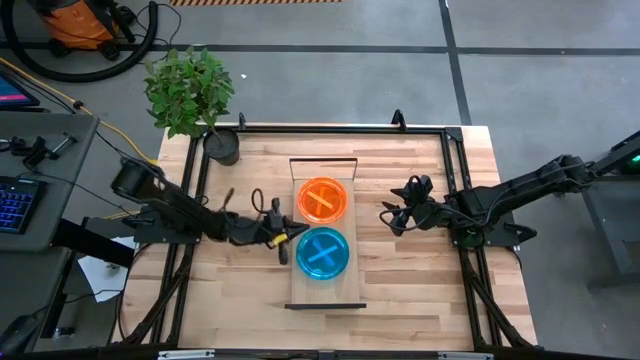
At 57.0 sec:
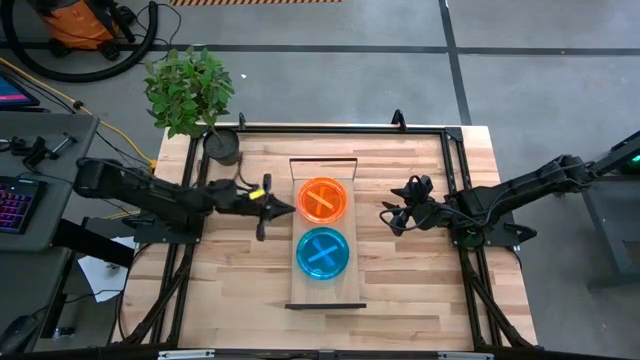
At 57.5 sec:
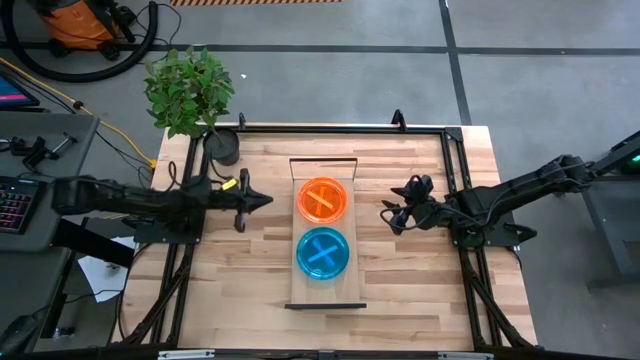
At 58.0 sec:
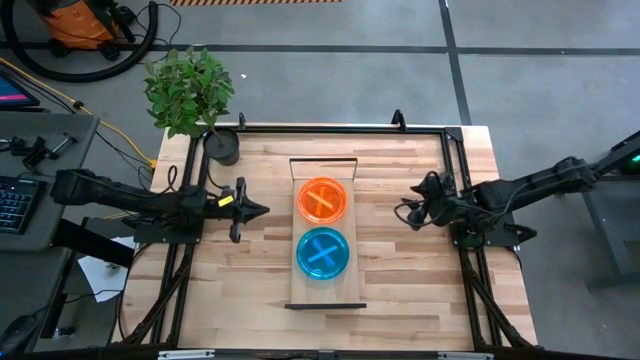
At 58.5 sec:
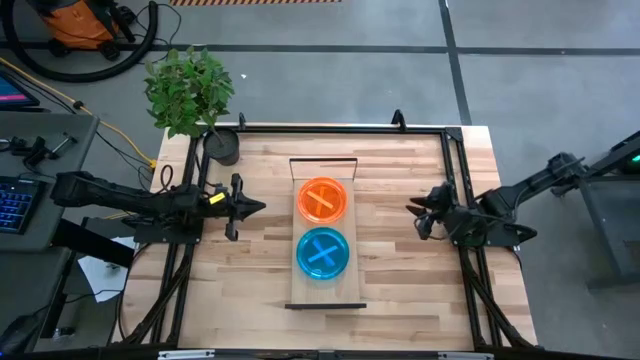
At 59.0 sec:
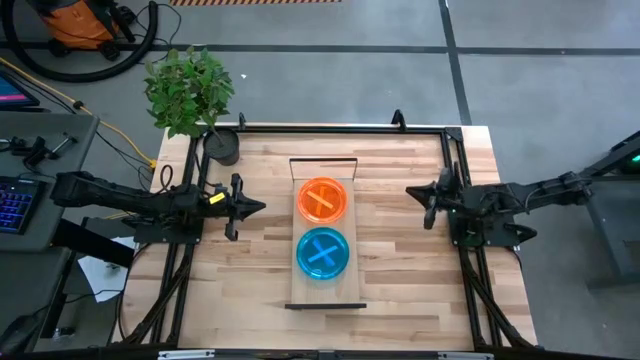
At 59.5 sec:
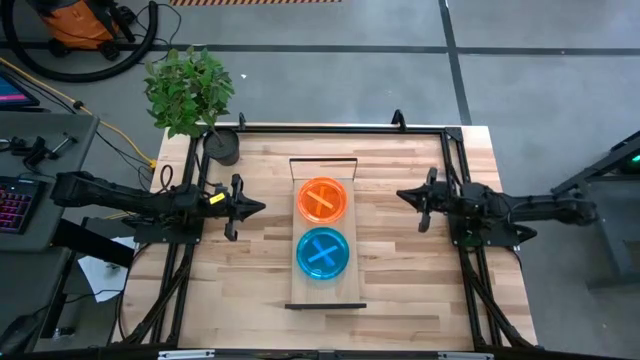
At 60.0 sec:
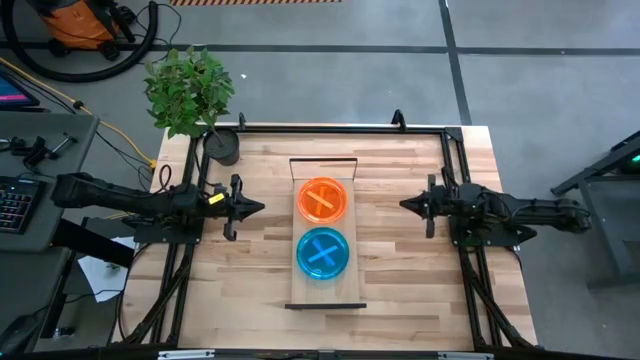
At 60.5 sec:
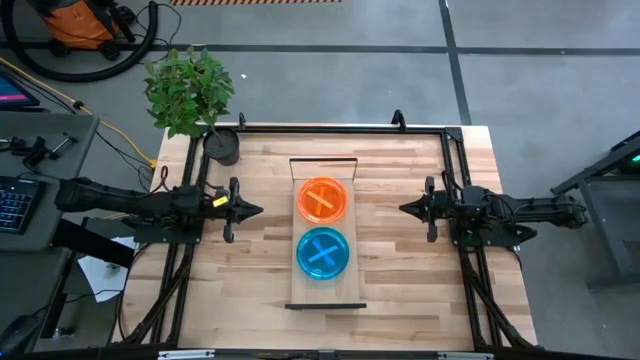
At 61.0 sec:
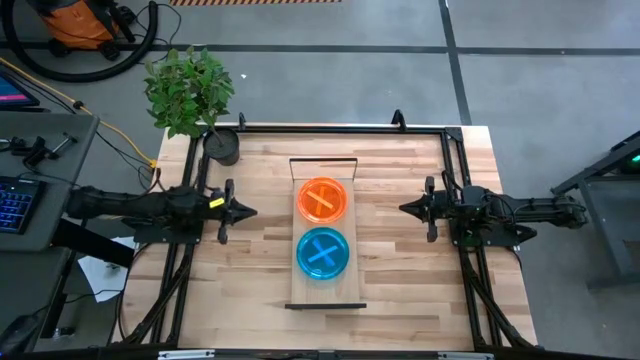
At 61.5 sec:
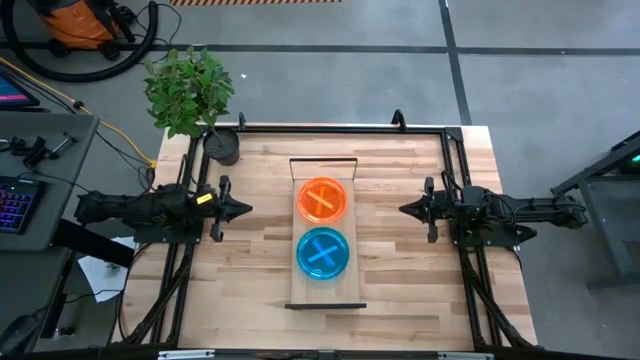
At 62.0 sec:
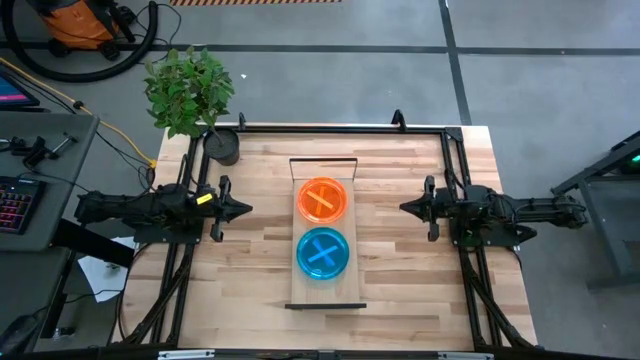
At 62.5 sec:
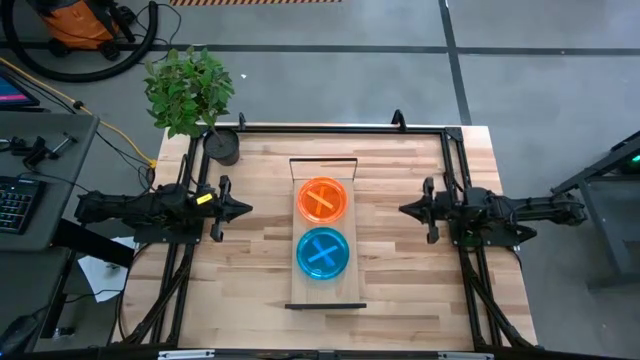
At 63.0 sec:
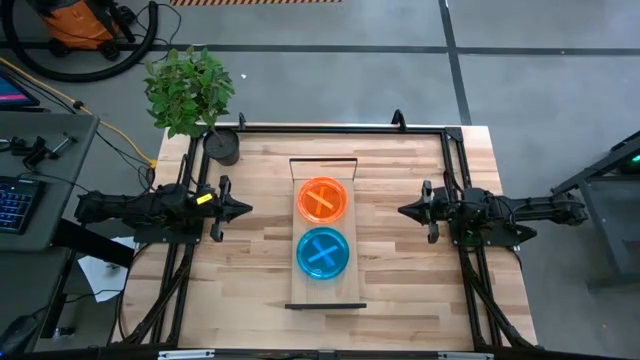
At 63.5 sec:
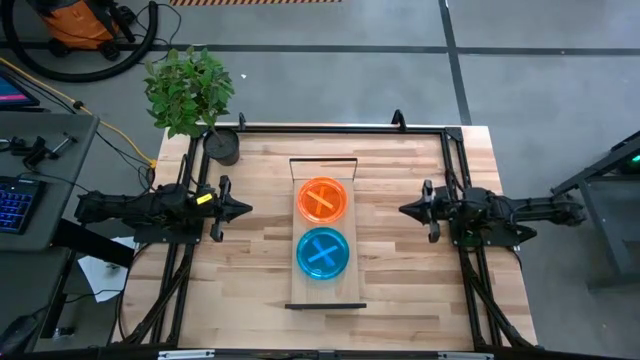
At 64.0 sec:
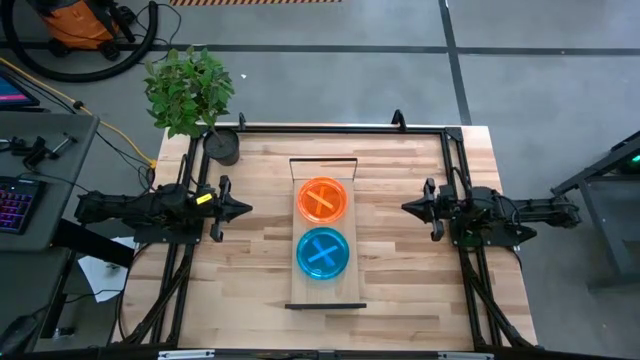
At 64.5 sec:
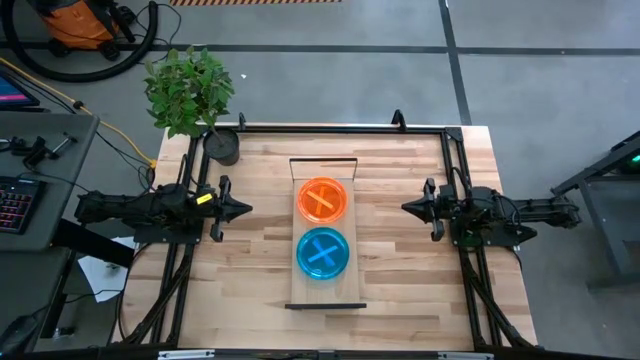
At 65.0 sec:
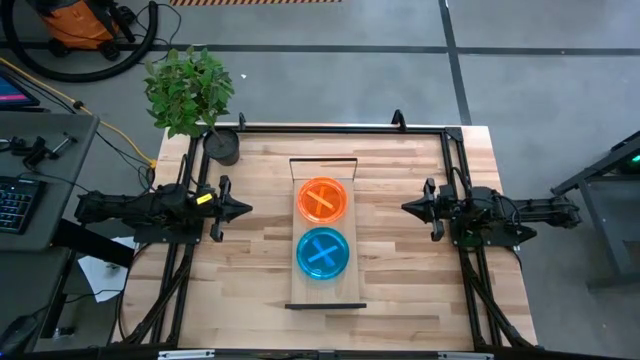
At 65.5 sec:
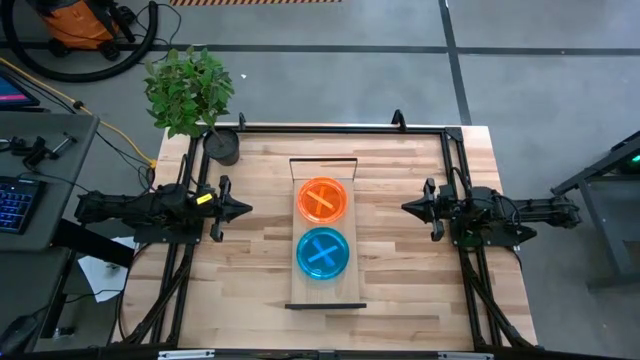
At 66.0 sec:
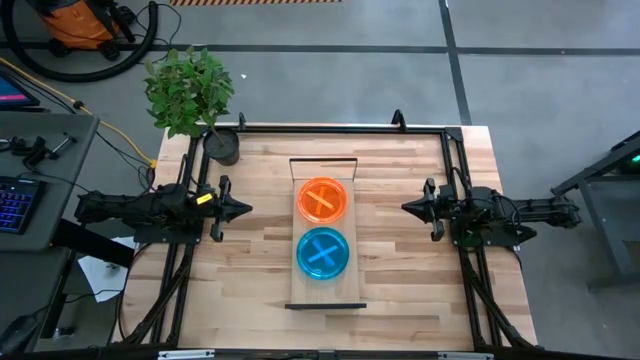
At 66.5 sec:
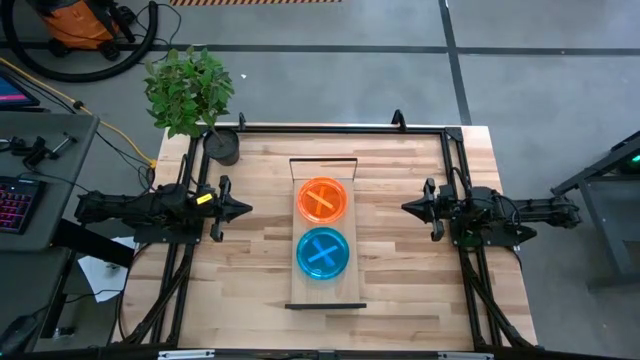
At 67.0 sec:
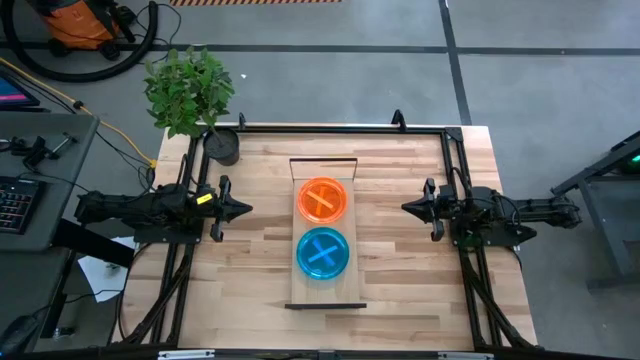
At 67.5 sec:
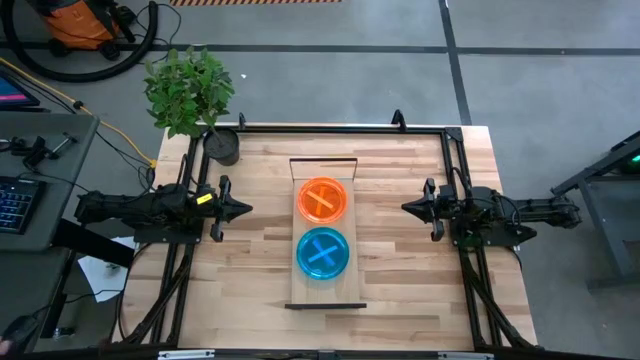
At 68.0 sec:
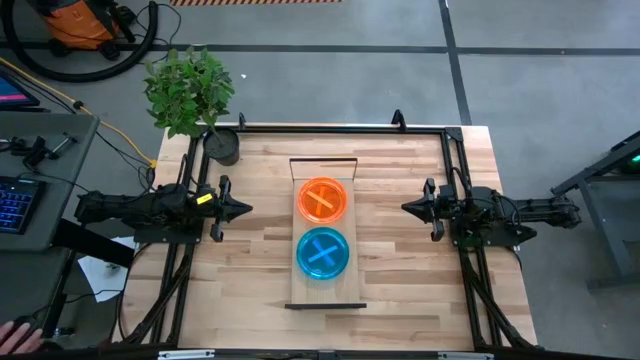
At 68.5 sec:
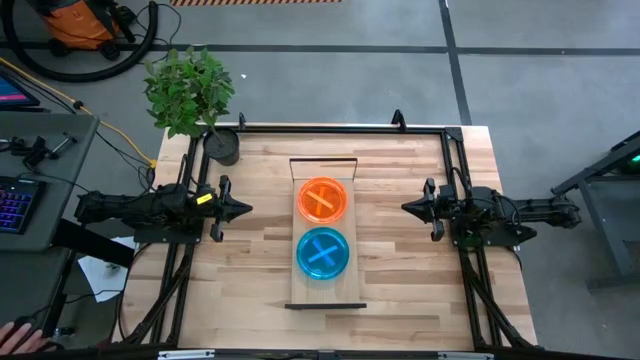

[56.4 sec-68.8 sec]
Task: Place and stack plates onto a shelf
Return to Home Position

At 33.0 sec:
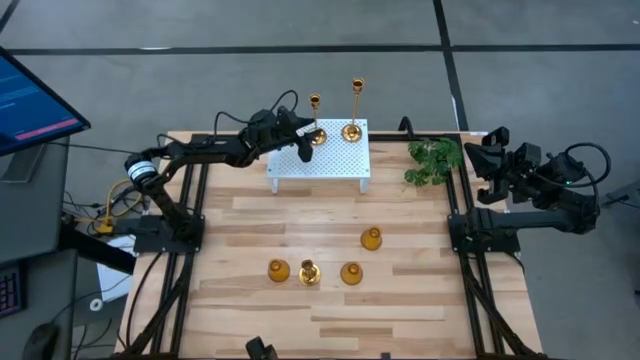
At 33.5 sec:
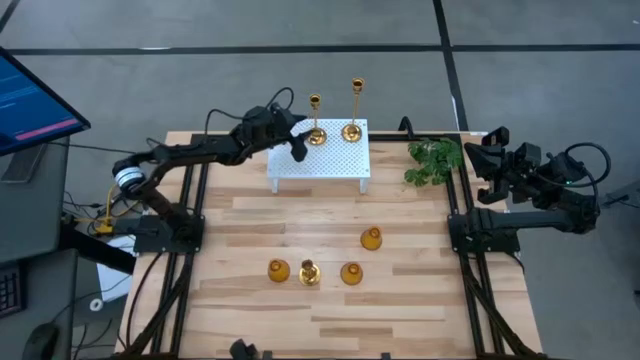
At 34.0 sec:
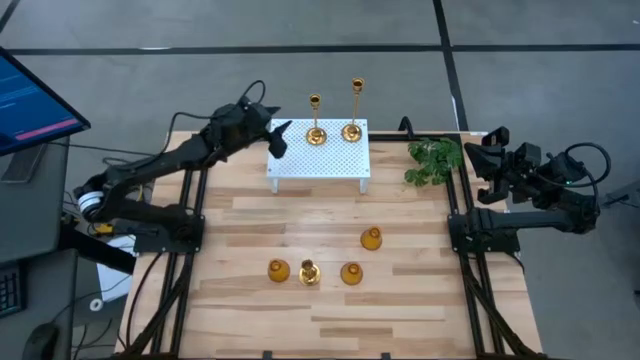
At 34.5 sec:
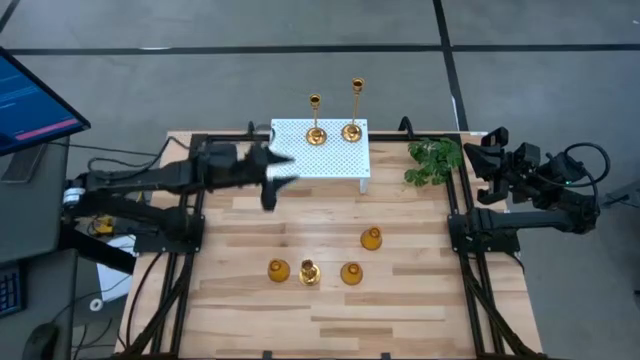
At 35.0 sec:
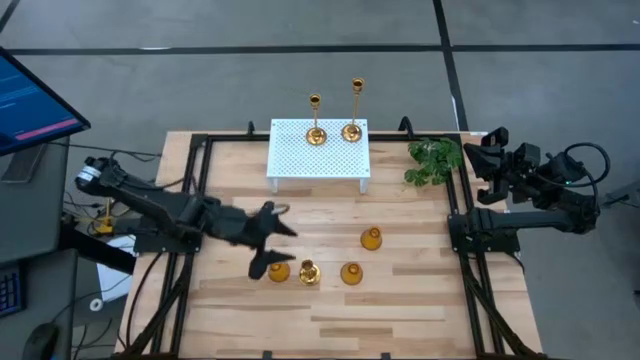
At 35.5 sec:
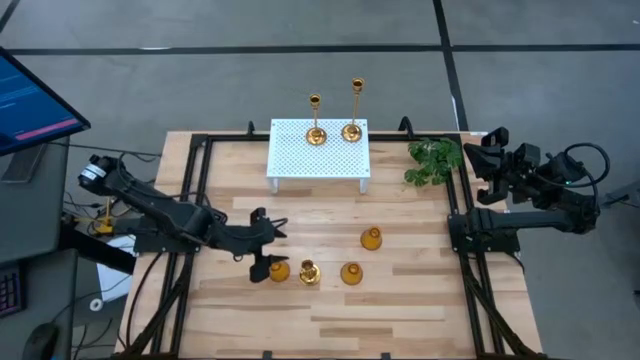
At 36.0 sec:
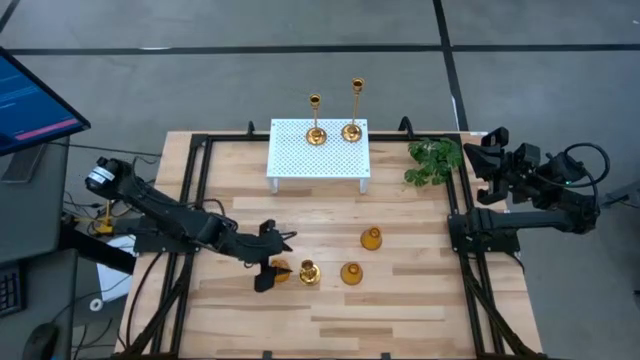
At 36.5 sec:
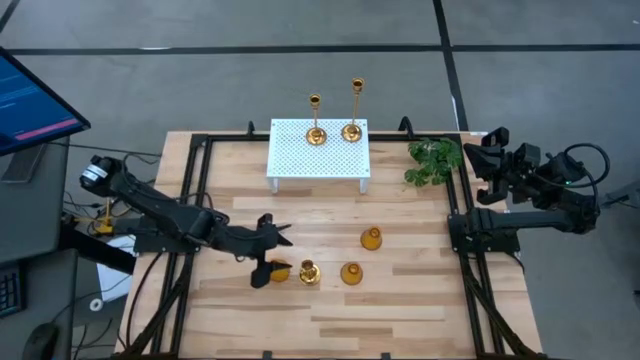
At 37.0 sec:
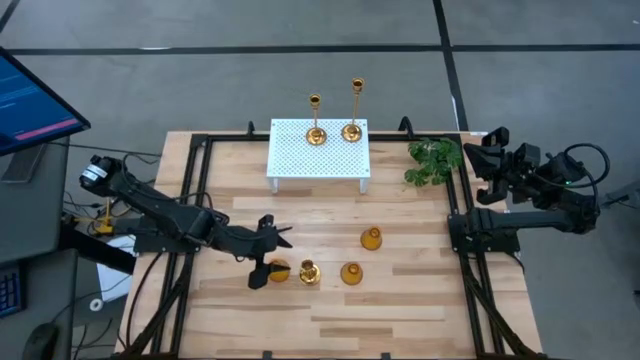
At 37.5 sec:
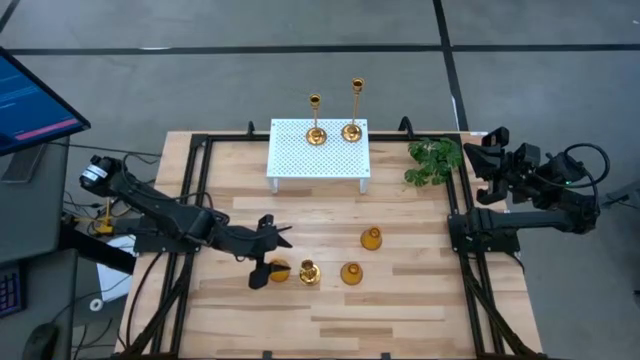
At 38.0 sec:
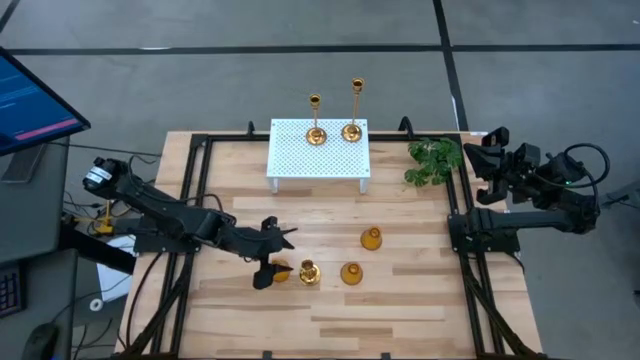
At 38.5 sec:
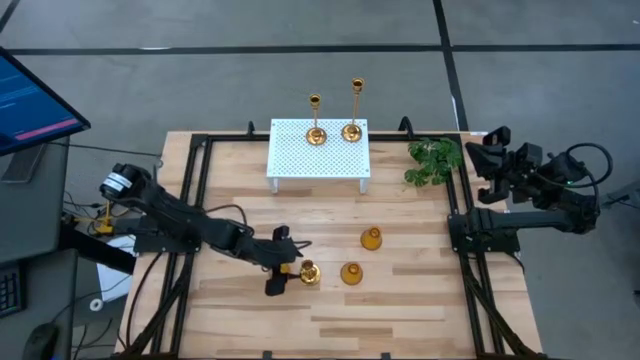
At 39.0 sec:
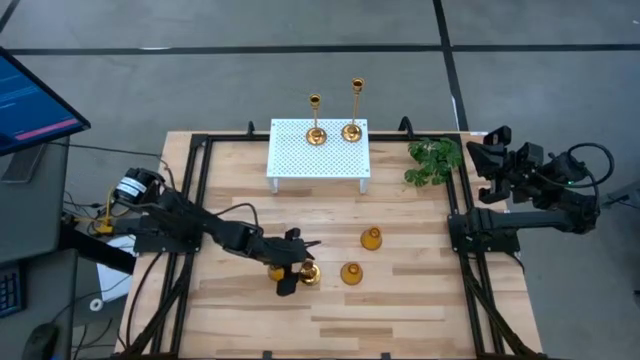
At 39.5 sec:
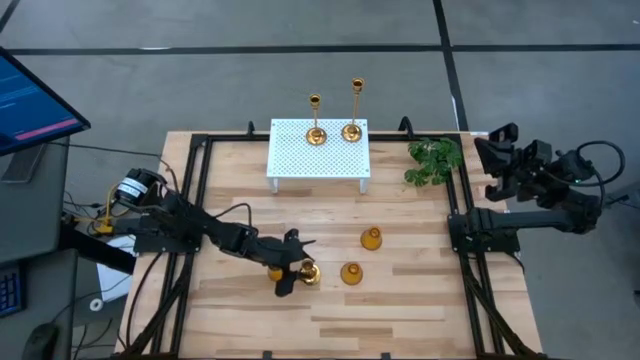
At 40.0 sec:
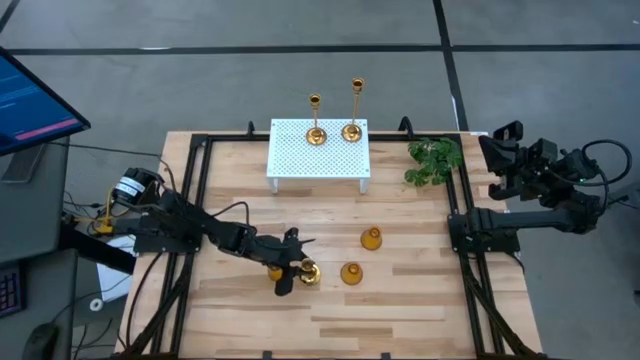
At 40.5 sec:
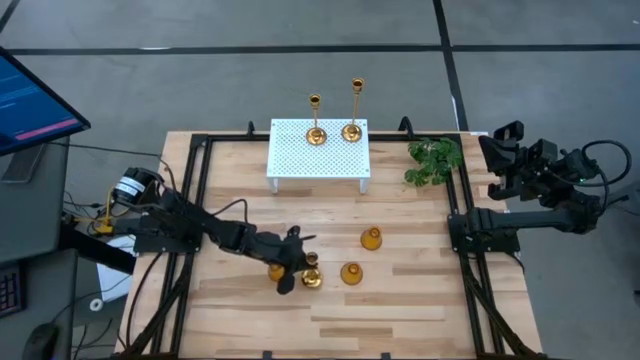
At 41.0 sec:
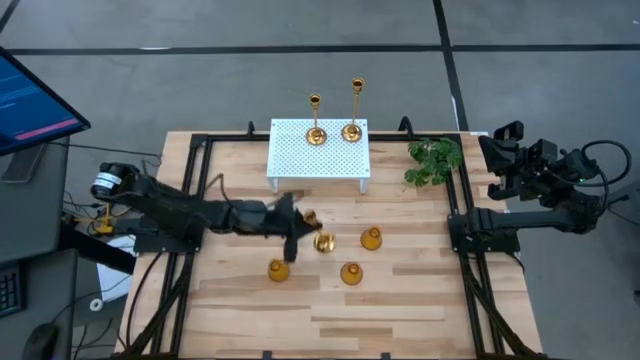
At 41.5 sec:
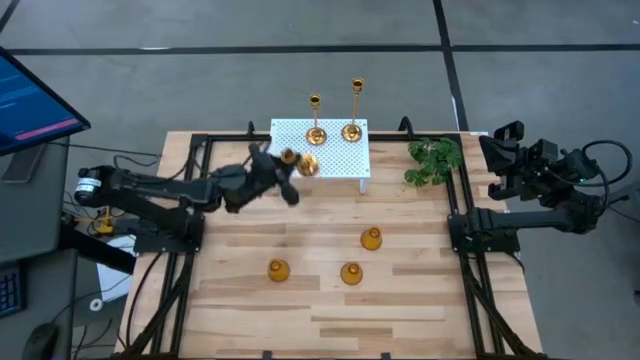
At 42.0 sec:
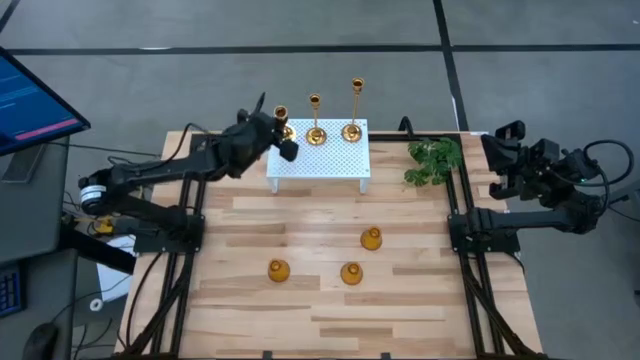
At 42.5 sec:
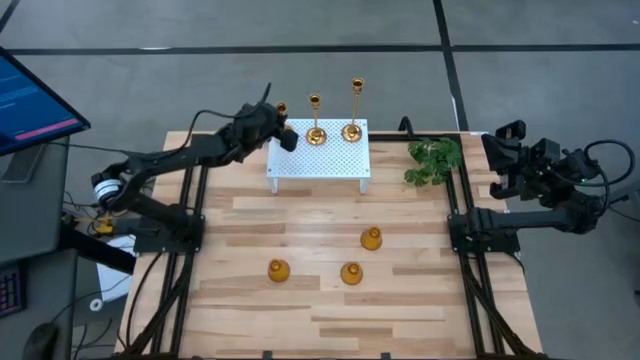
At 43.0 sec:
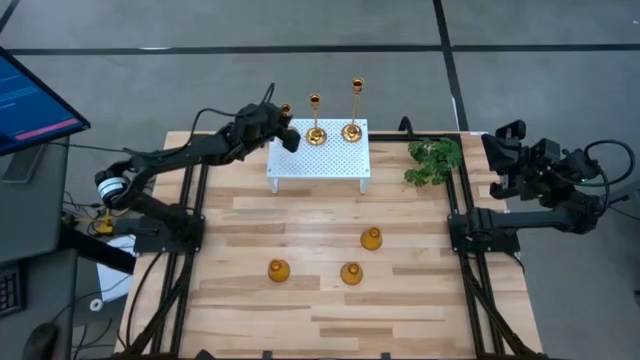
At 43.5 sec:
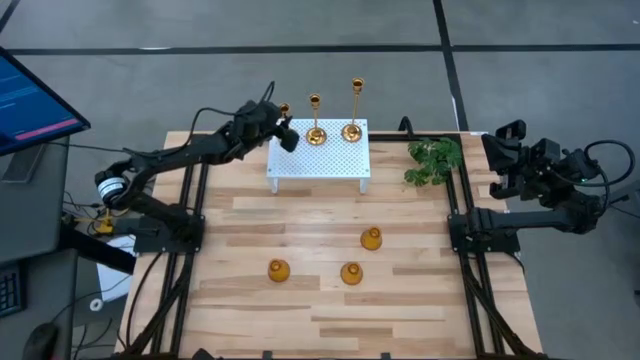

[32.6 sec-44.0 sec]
Task: Pick & Place candle stick holders
Put the small gold candle holder on the shelf
